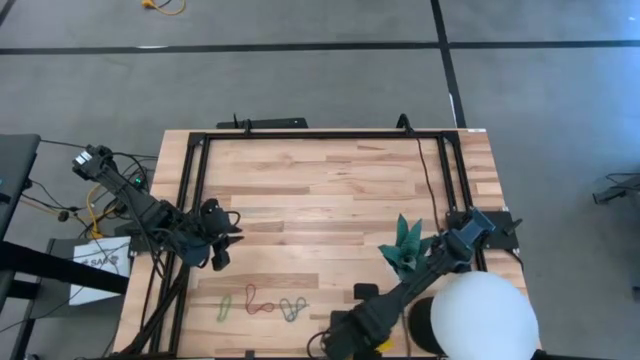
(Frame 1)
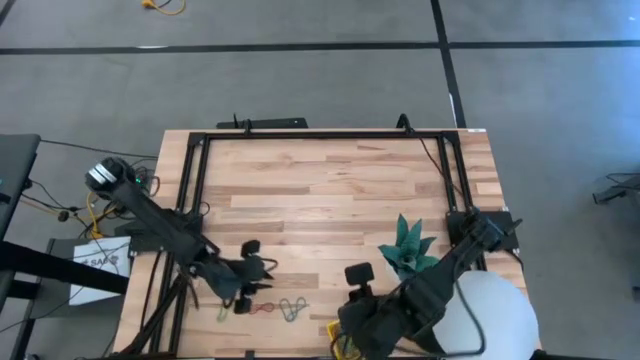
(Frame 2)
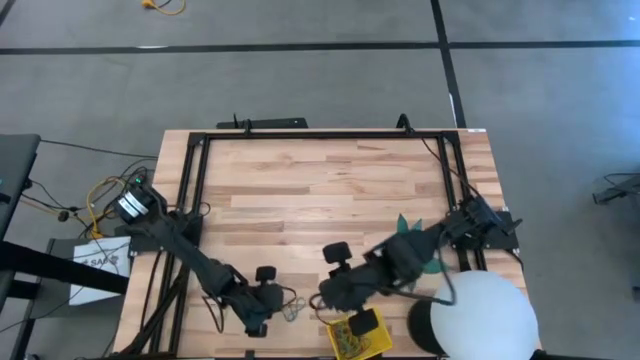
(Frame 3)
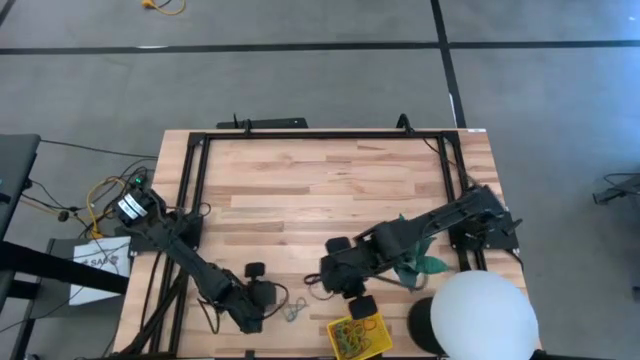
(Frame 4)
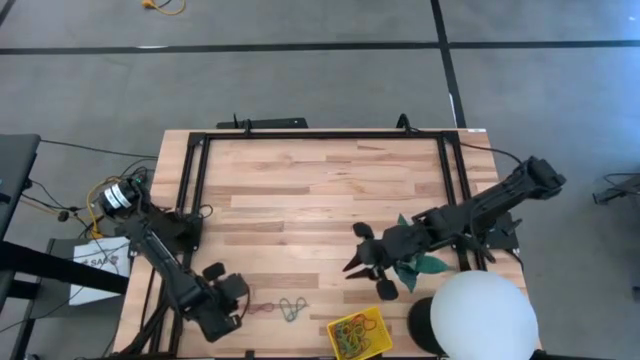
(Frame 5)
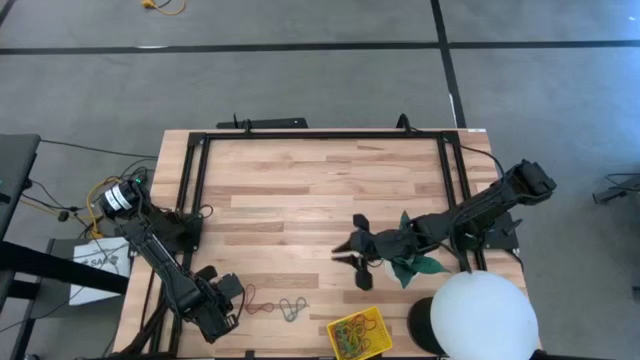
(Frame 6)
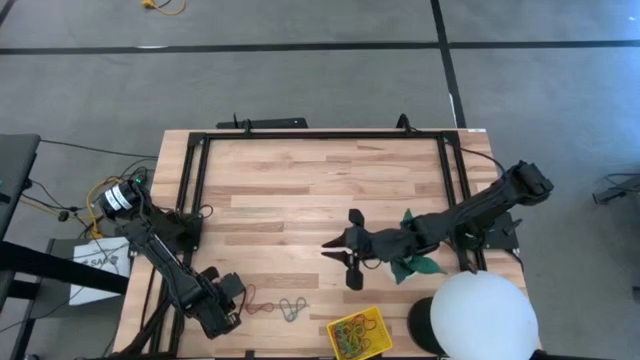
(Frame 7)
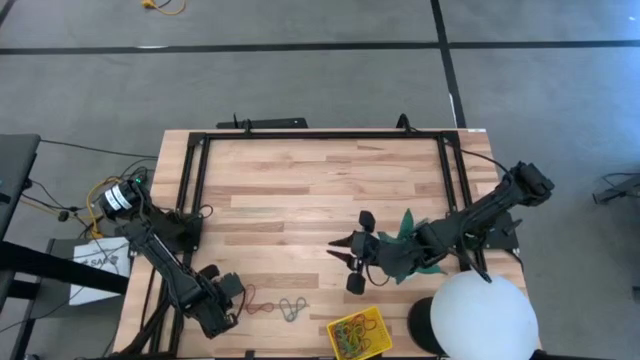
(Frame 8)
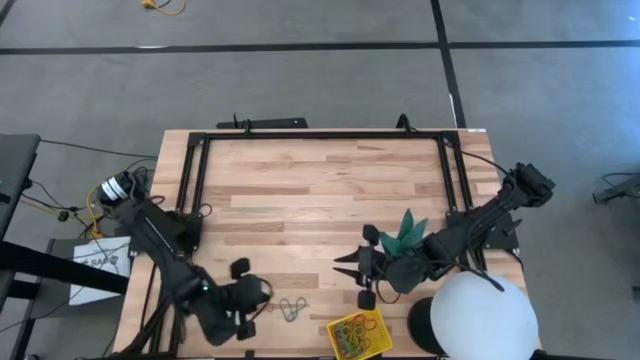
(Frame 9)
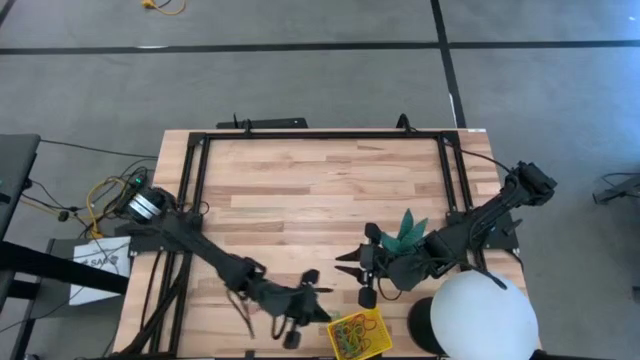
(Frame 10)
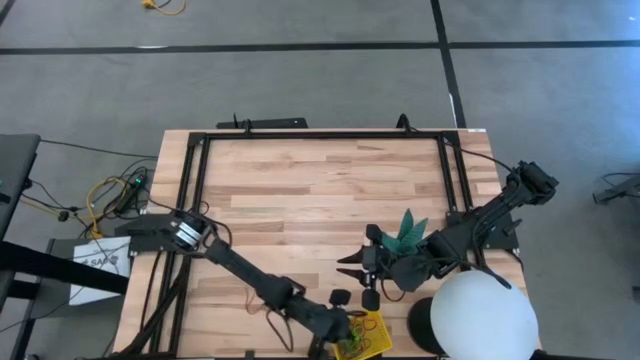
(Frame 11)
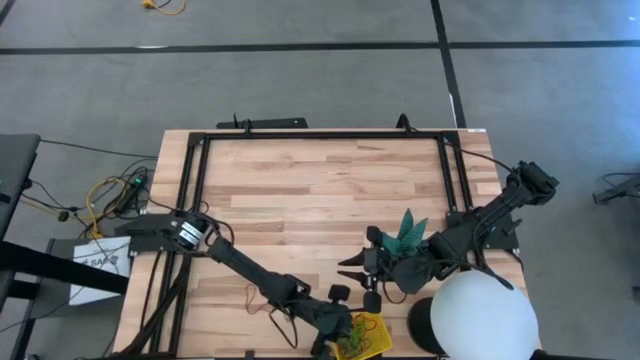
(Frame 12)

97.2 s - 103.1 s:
Task: Pick and place items into bin
Put the green rubber band into the yellow bin

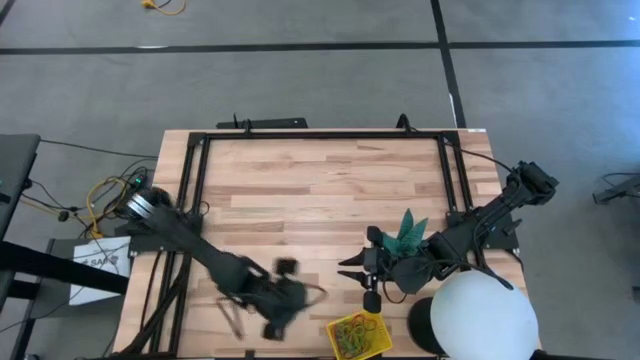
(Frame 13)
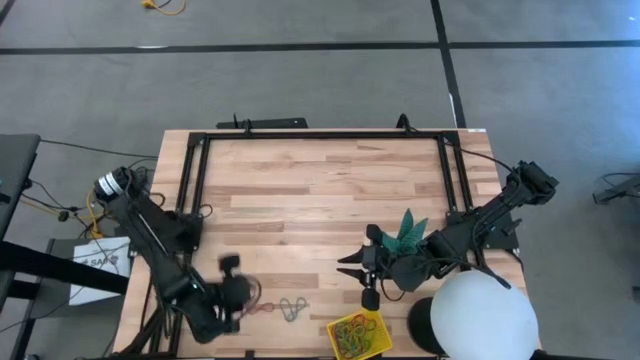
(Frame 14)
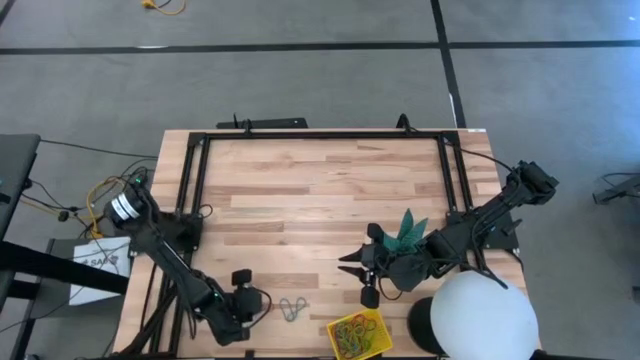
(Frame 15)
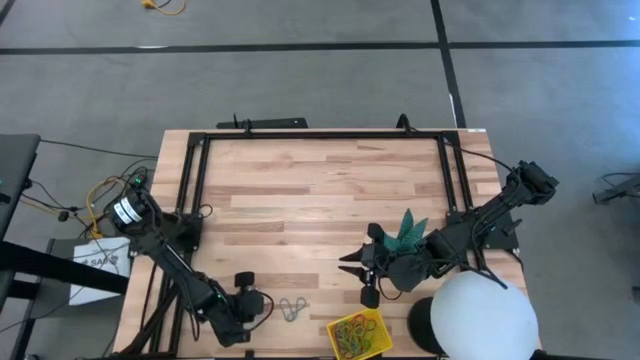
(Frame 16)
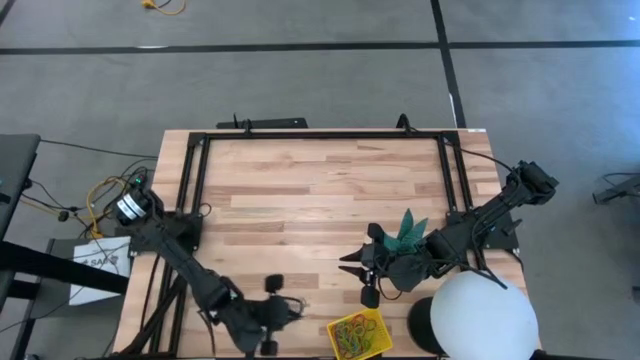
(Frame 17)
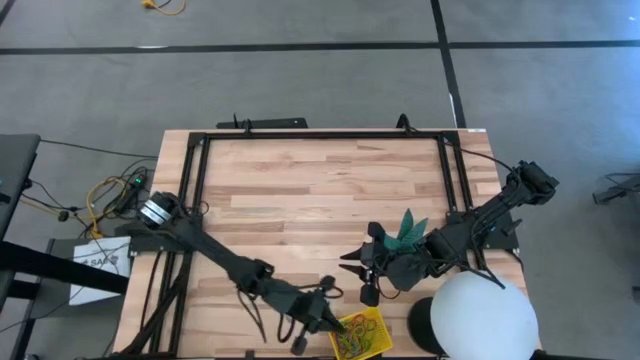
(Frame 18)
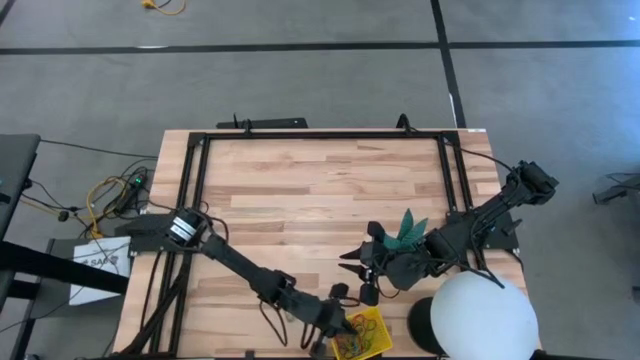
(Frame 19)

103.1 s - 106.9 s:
Put the red rubber band into the yellow bin

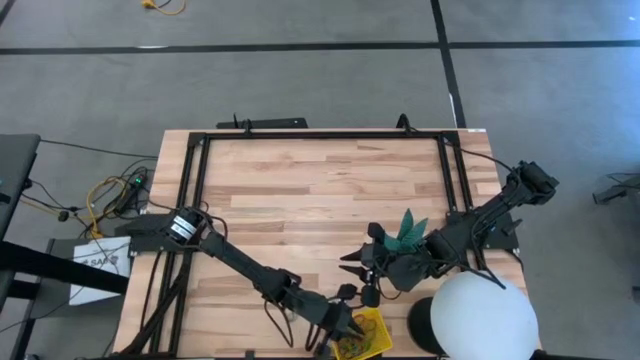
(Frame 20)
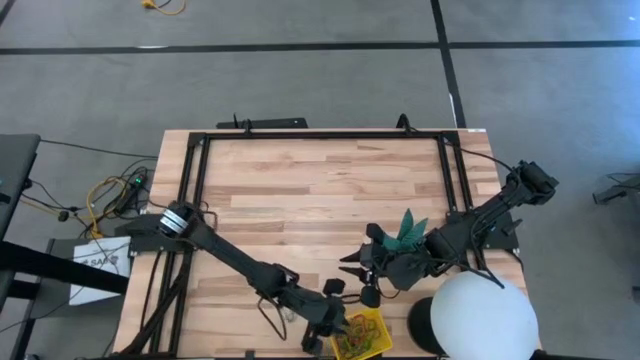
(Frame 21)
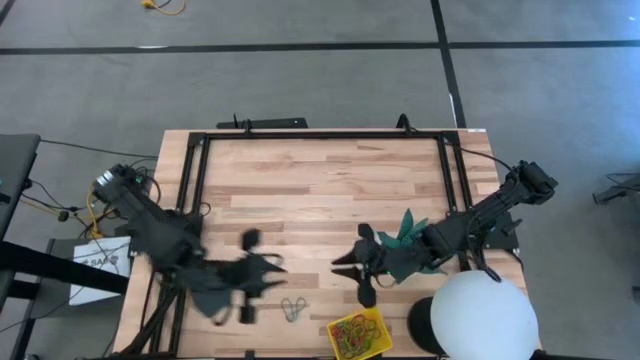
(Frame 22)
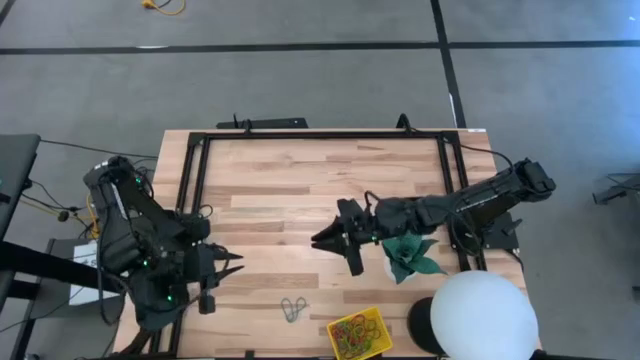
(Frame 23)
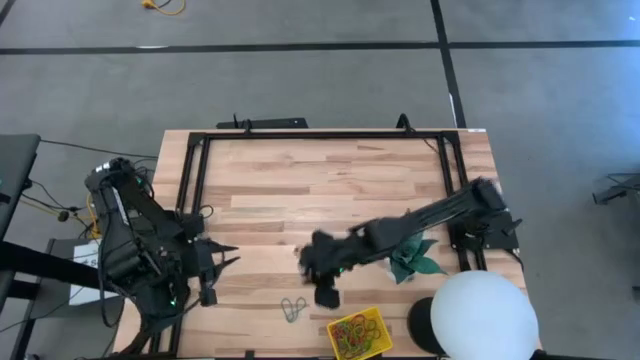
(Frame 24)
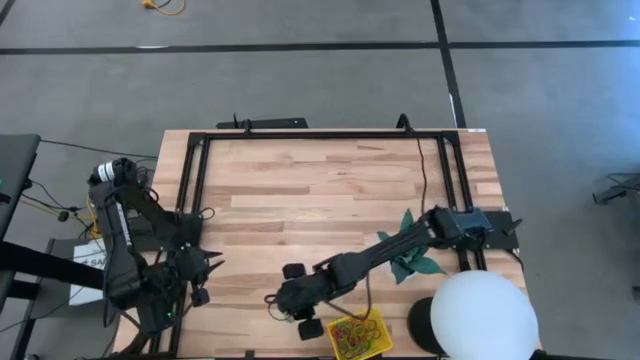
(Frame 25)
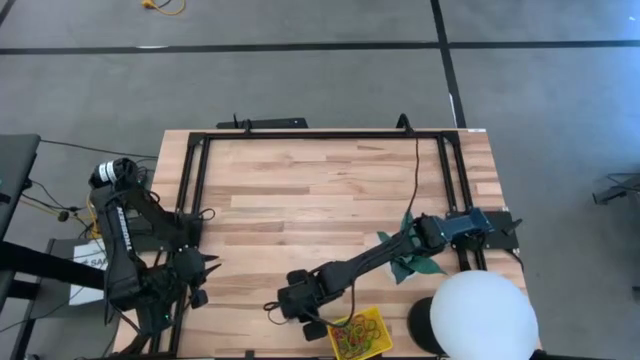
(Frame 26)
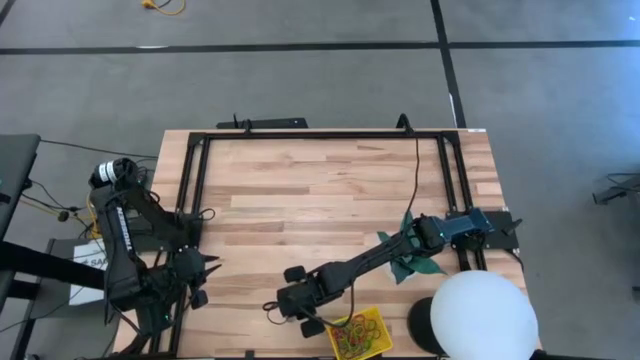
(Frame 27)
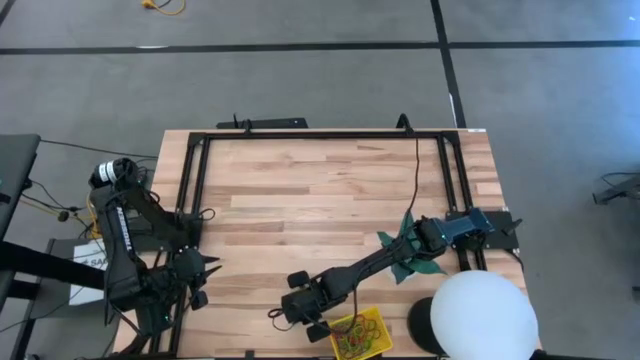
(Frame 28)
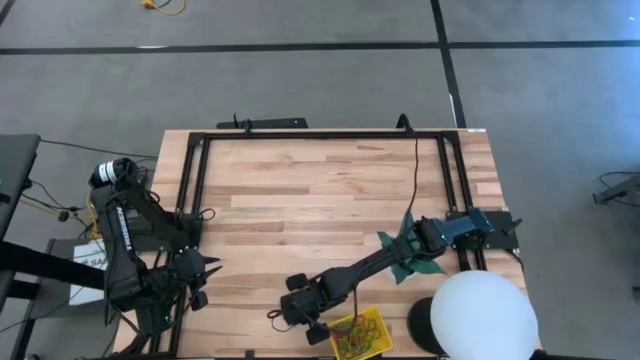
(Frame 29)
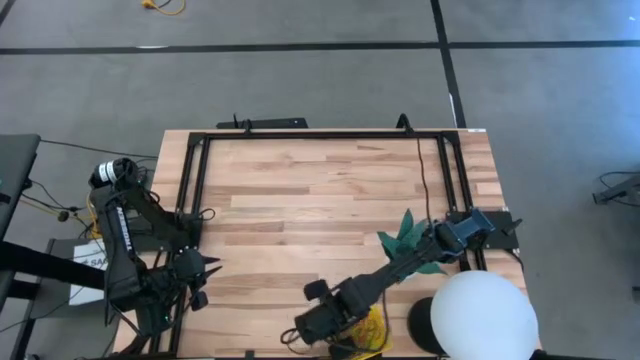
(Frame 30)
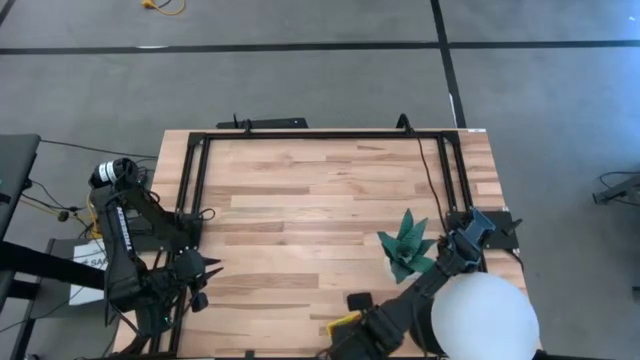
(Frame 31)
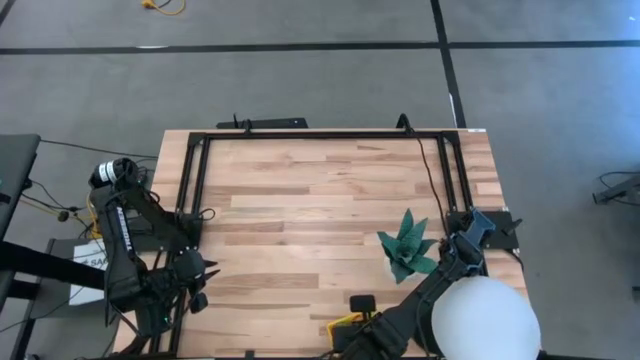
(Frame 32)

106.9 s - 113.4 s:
Put the blue rubber band into the yellow bin

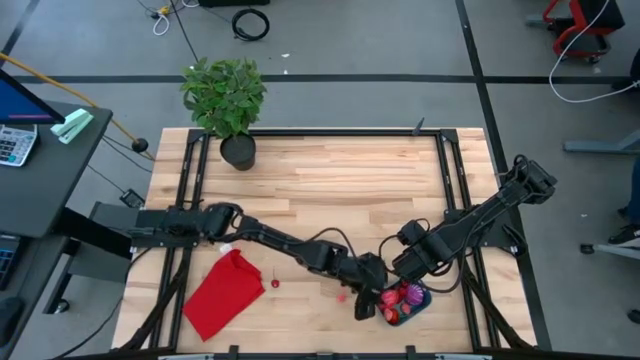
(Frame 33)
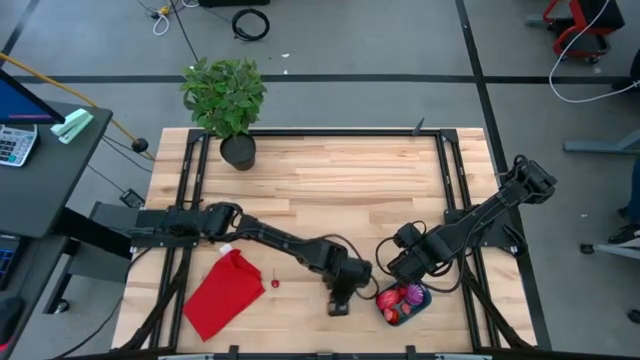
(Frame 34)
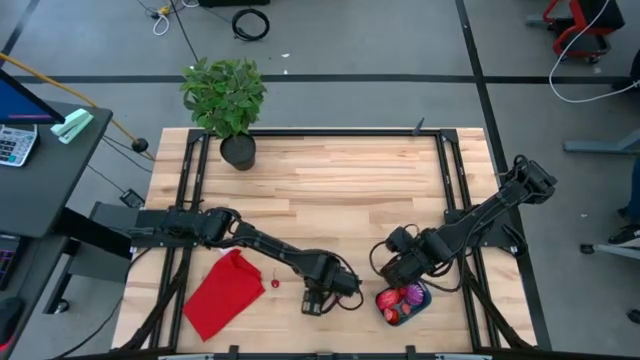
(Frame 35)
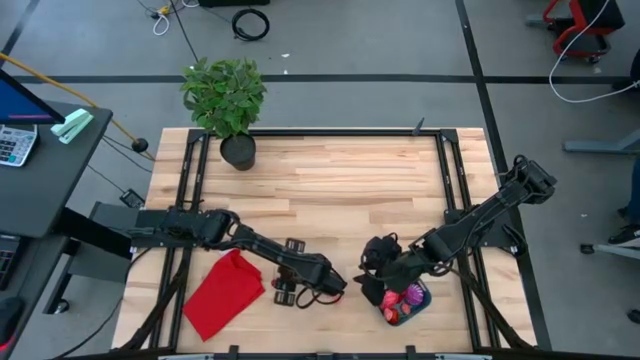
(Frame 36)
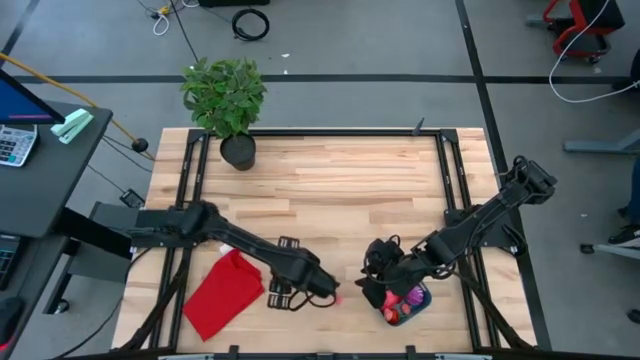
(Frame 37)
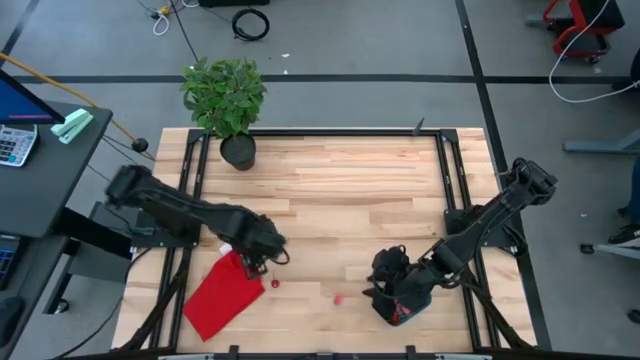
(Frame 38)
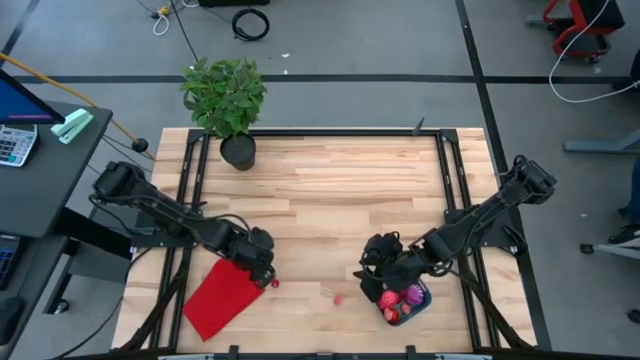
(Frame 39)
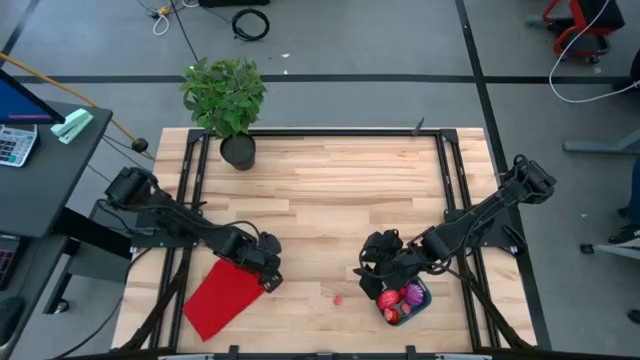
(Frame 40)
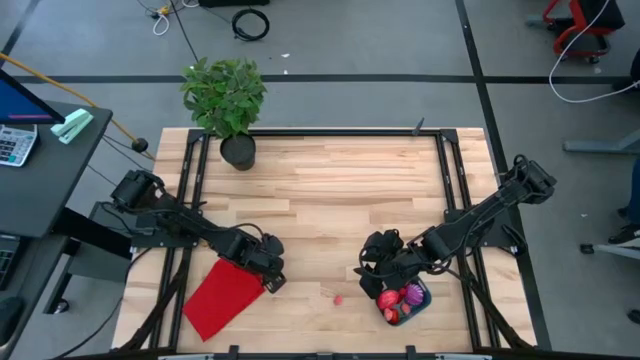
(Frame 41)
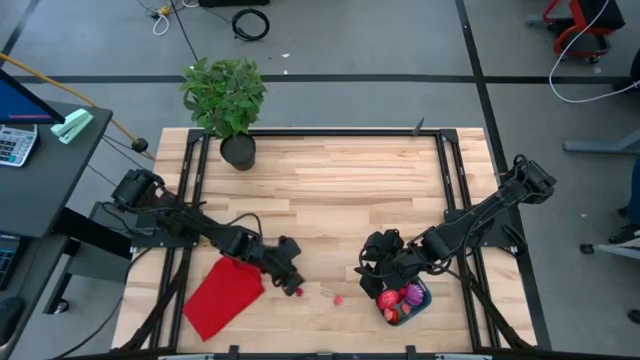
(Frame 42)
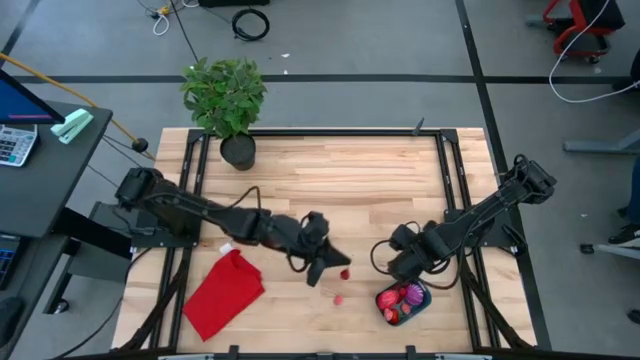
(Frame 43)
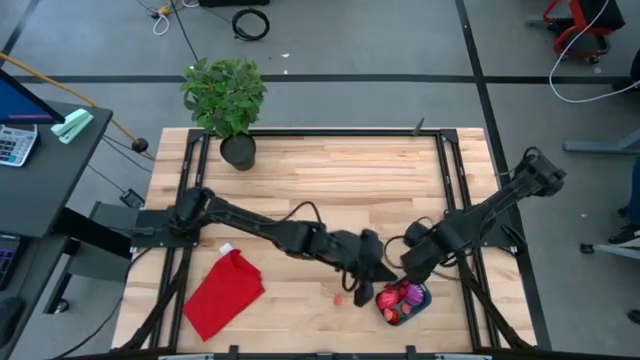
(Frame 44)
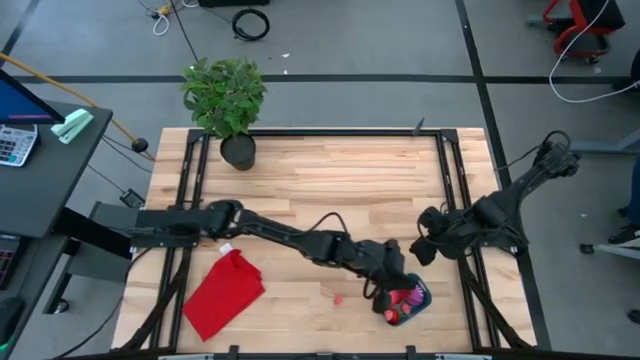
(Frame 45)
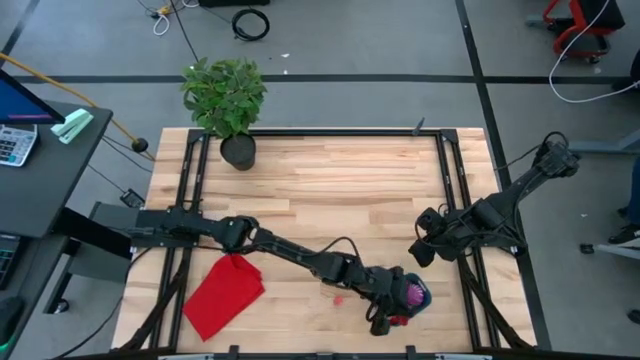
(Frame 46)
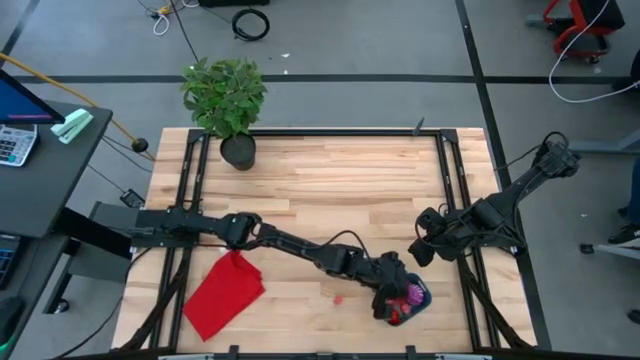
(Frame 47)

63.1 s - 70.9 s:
Task: Pick and placing Produce into tupperware
Put the cherry into the bin
